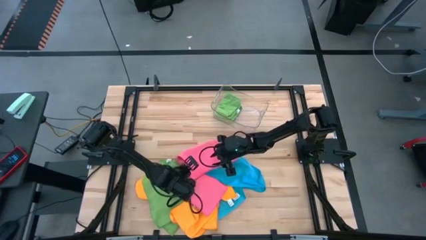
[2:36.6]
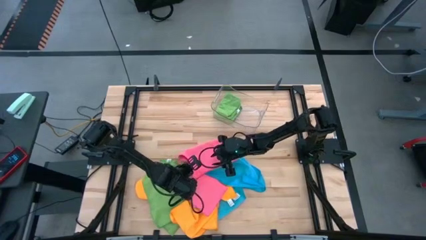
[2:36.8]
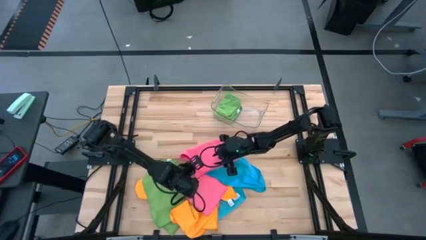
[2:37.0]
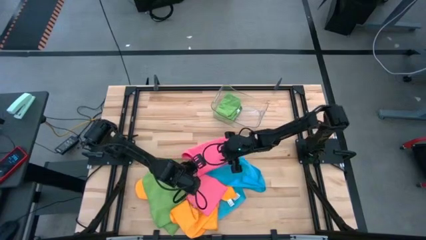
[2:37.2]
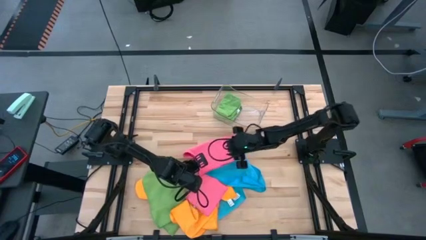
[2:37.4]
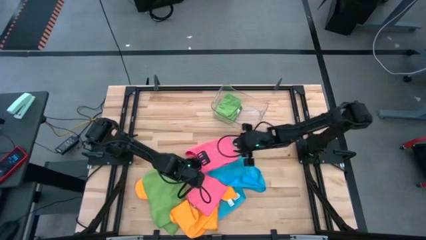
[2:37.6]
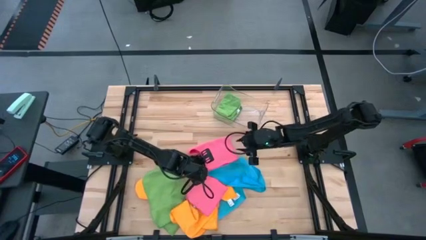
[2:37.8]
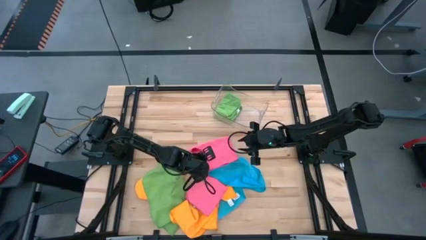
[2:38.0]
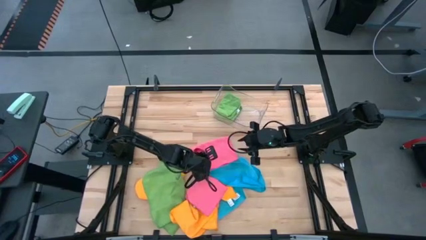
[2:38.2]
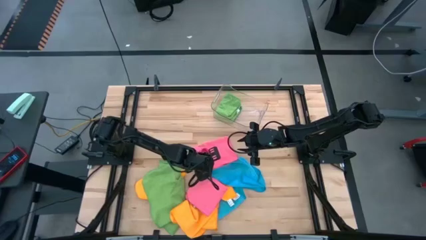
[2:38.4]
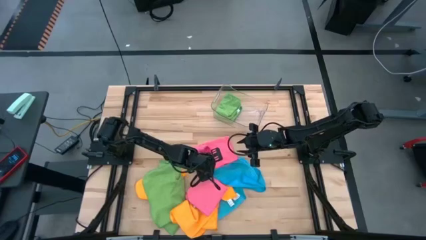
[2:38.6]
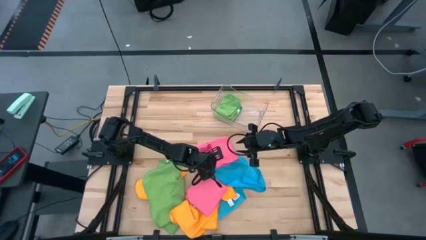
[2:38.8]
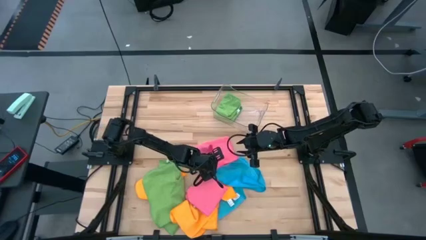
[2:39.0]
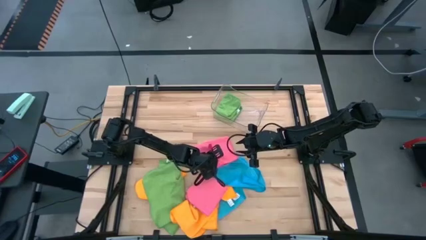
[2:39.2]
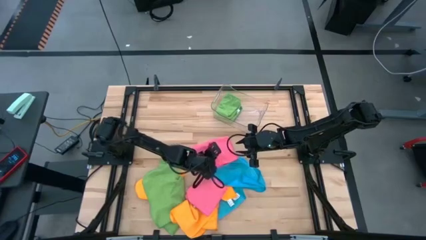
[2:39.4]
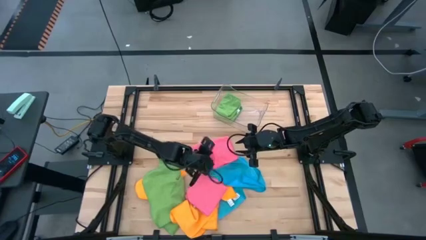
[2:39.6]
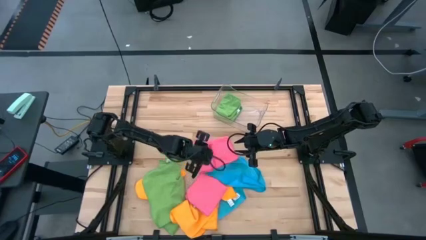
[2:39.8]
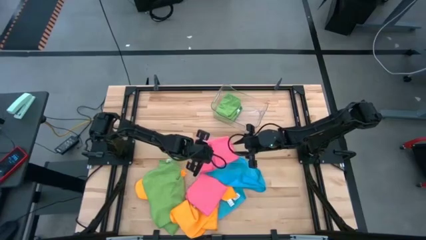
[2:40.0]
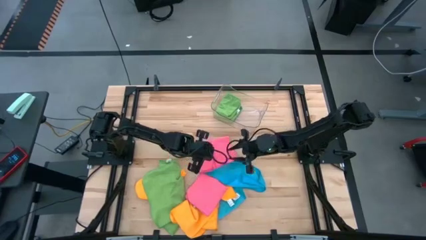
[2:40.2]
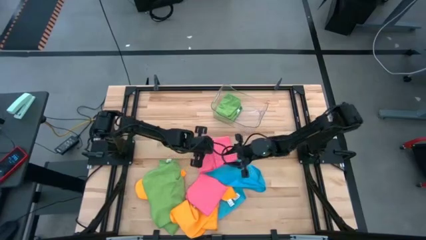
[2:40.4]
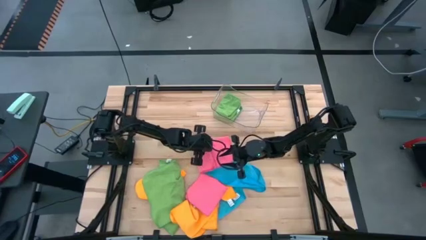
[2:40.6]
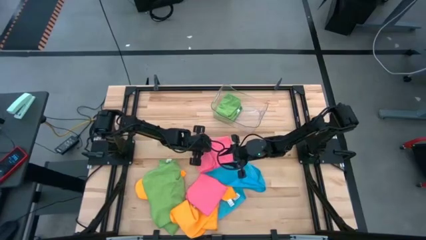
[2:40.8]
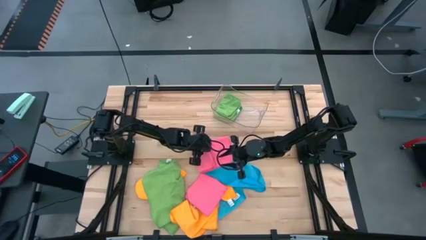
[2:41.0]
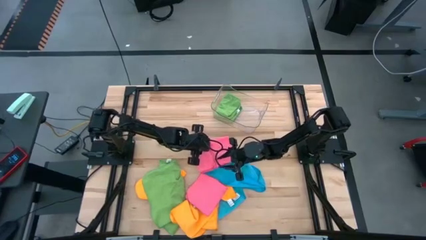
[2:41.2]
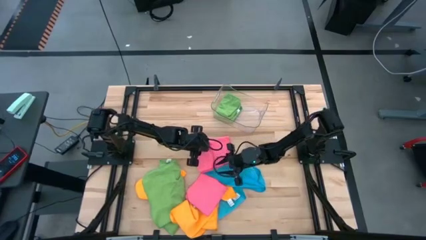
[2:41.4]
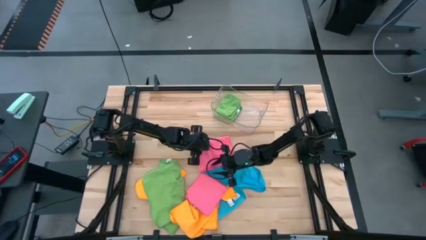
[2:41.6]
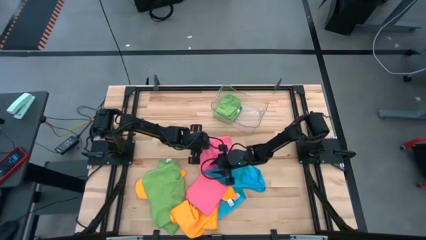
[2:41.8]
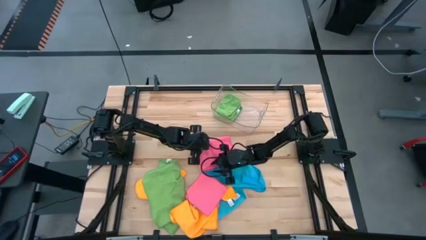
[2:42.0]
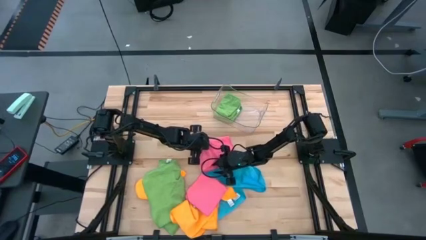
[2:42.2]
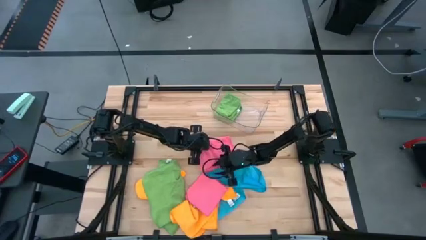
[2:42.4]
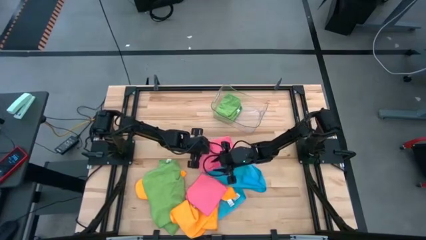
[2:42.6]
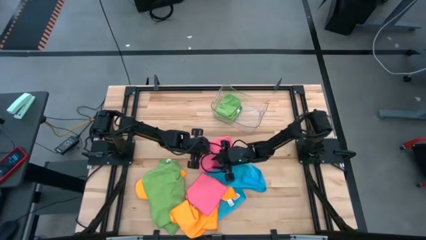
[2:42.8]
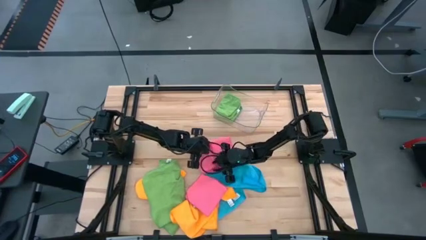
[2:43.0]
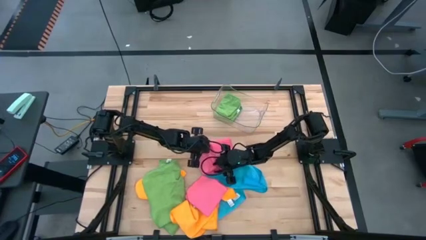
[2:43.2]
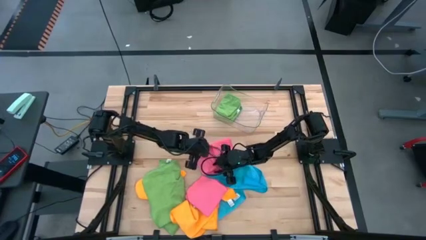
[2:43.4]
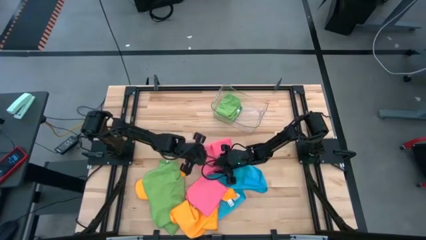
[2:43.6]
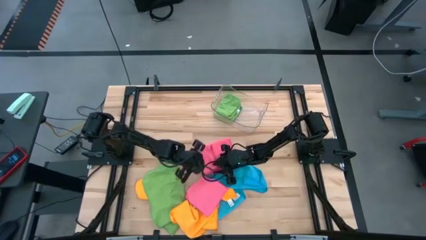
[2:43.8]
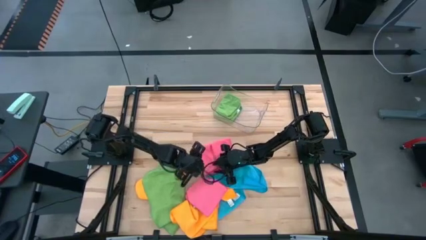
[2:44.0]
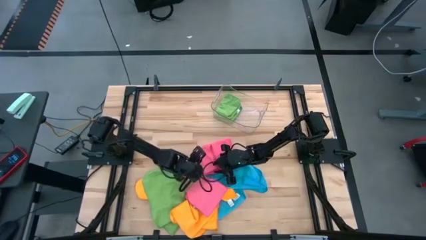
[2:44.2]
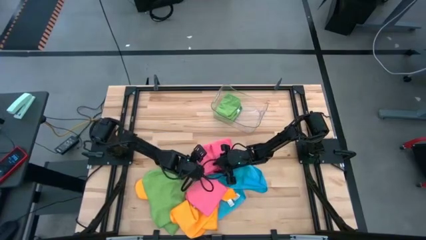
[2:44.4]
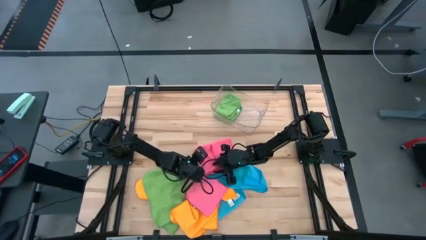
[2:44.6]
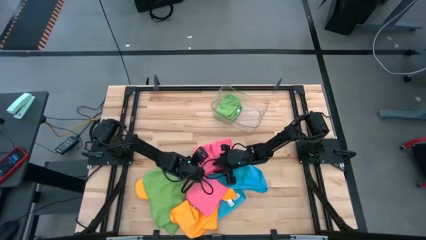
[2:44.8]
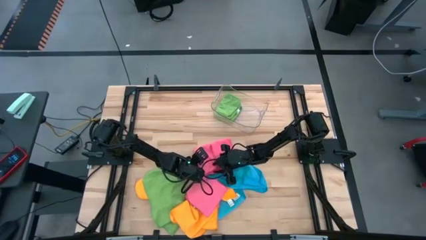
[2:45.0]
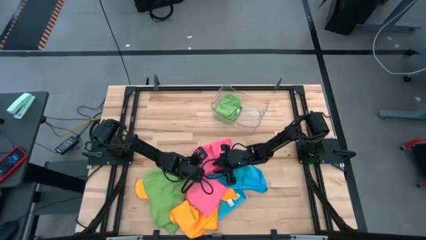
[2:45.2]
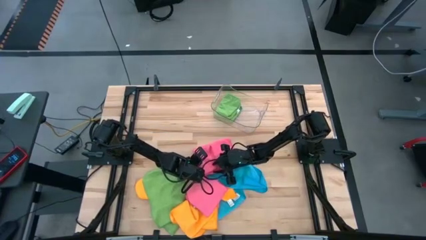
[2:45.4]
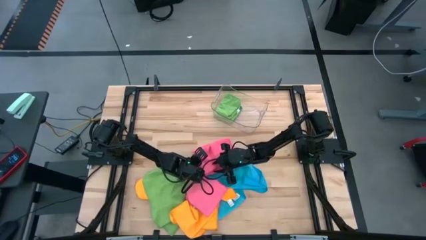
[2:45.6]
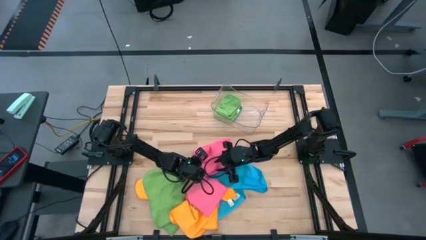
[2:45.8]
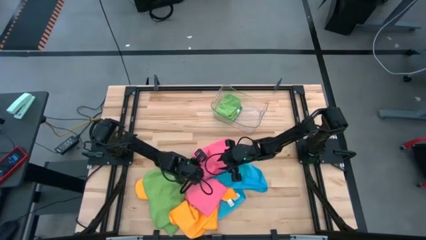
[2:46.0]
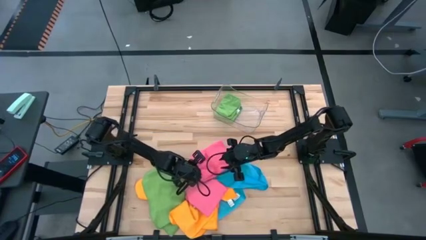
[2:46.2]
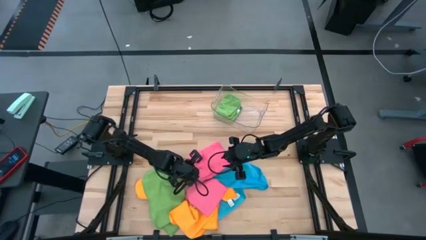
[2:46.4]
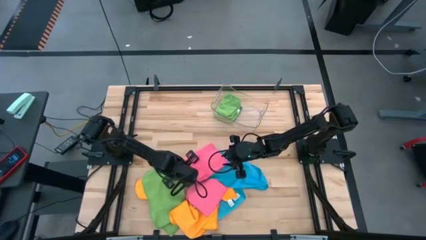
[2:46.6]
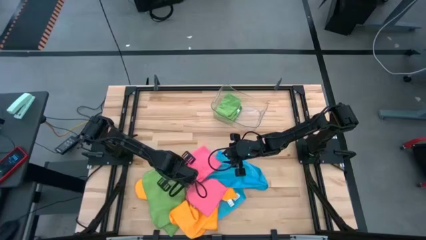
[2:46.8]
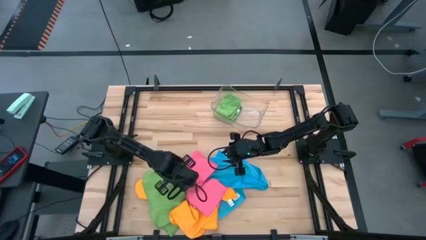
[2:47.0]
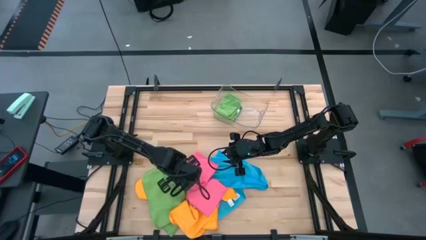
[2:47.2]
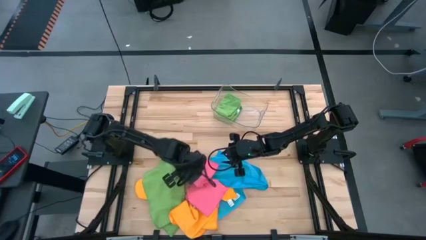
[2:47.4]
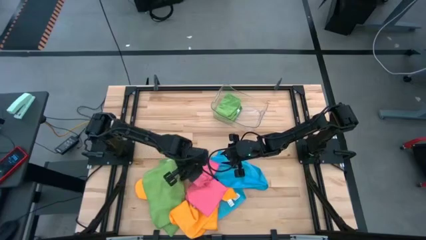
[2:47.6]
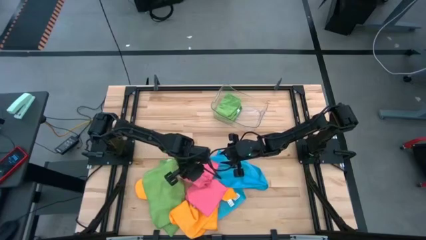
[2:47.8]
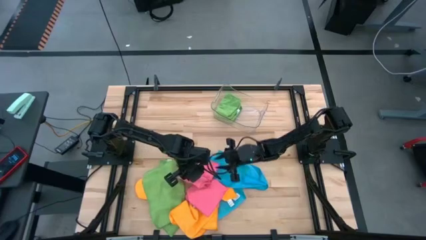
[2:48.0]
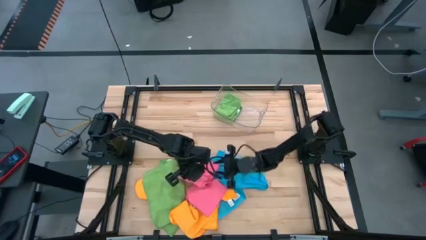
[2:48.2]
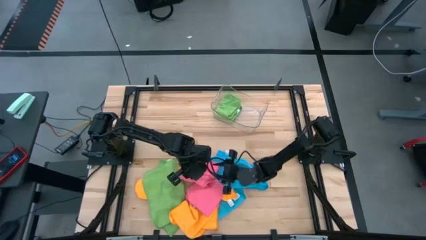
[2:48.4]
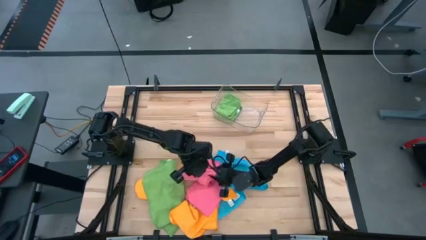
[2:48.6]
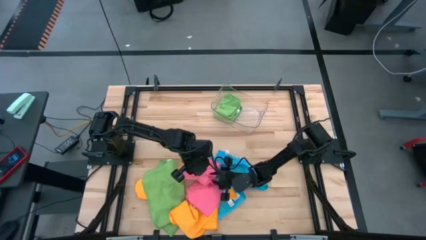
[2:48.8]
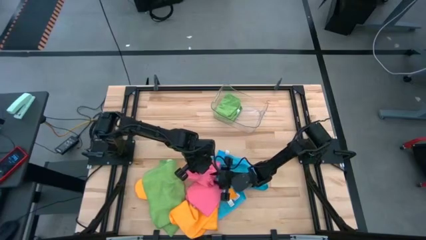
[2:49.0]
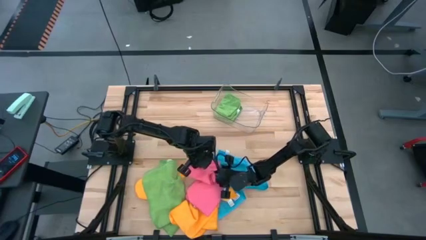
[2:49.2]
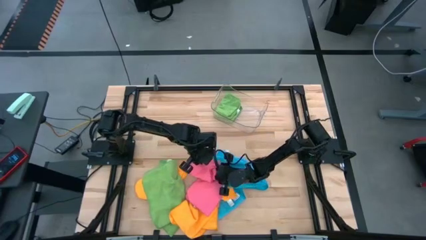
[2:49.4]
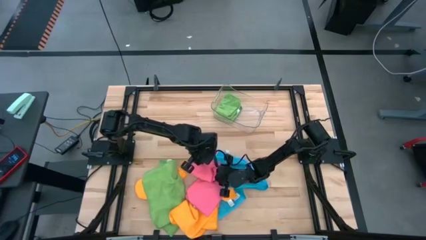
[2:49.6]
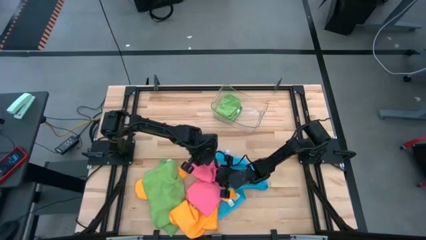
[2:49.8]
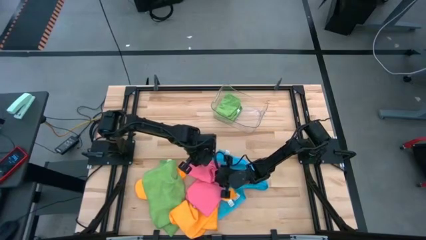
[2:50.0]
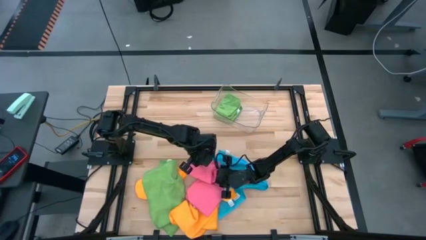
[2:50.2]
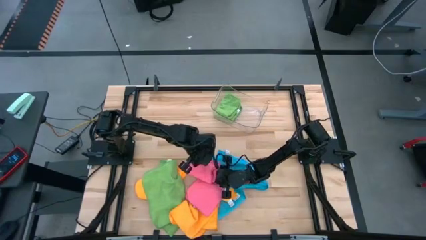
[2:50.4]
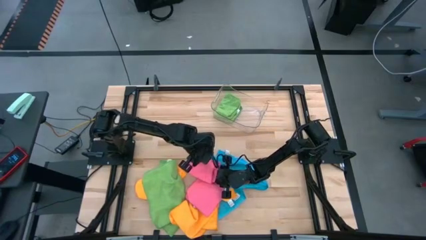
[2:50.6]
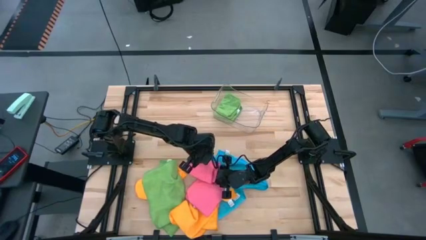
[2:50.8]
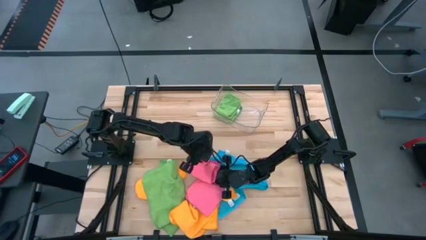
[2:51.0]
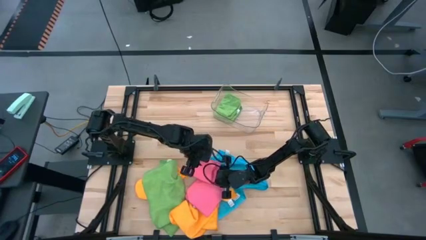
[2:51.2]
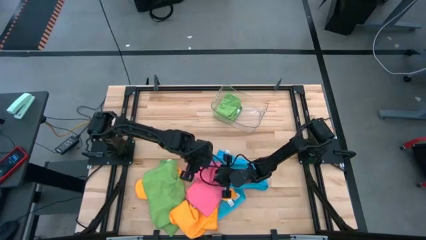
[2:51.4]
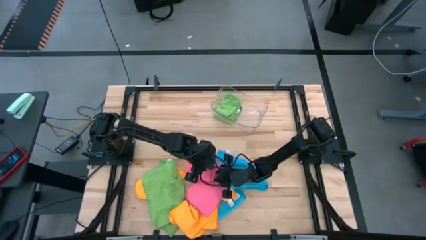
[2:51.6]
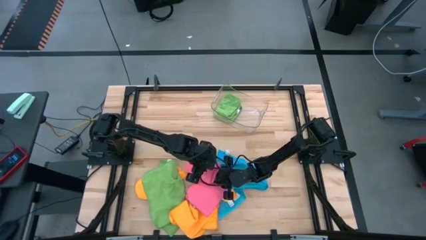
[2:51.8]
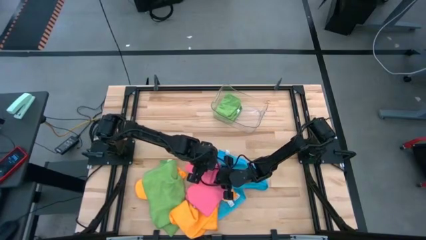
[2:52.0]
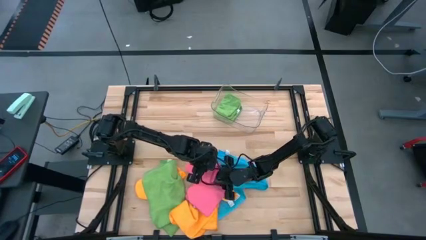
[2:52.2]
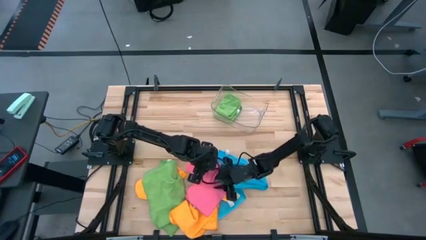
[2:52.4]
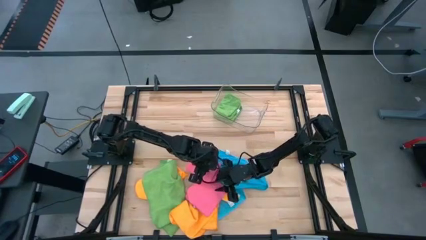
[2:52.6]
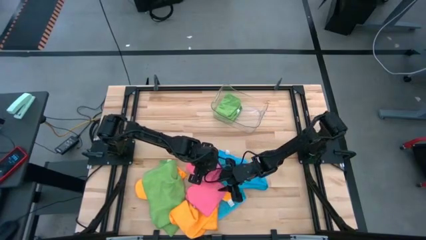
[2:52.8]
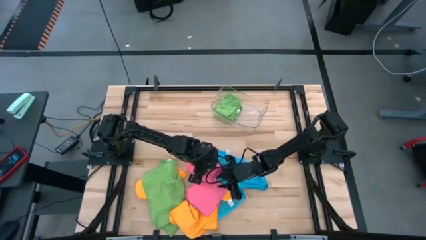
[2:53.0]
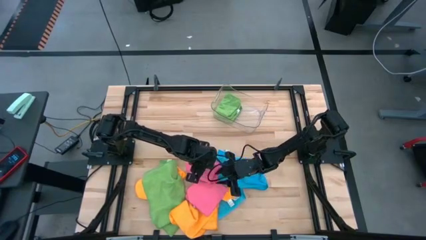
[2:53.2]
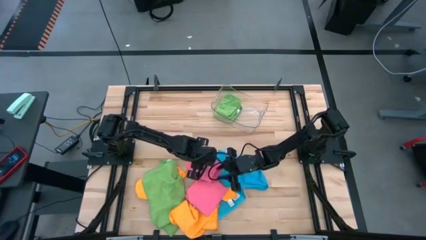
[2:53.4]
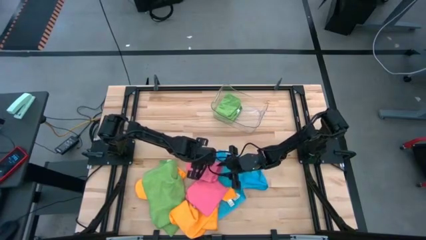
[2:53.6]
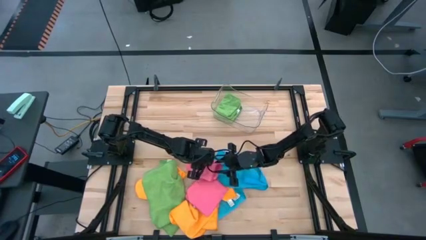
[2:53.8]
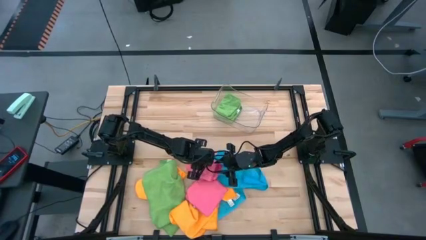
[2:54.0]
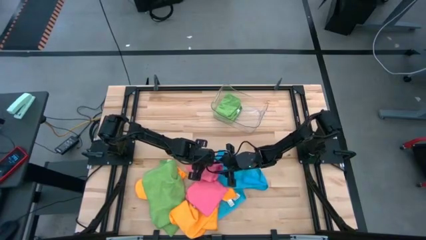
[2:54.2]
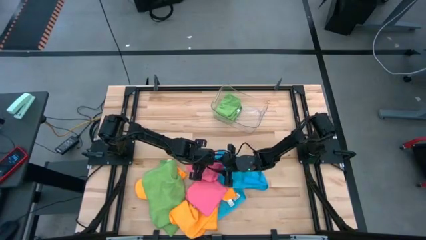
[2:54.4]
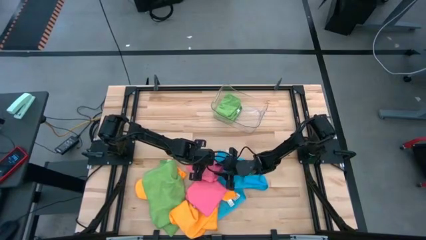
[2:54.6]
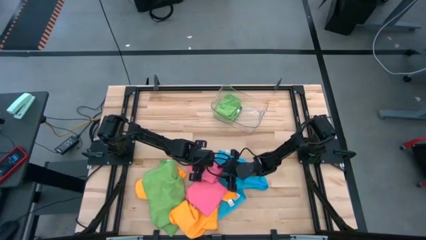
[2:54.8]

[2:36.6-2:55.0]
Task: Fold microfiber towels
Fold the top pink towel
